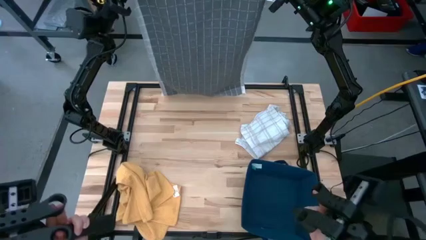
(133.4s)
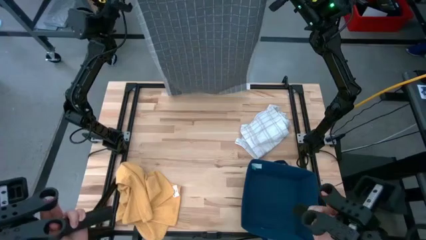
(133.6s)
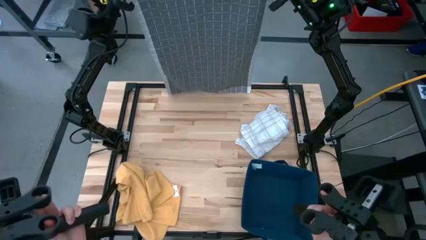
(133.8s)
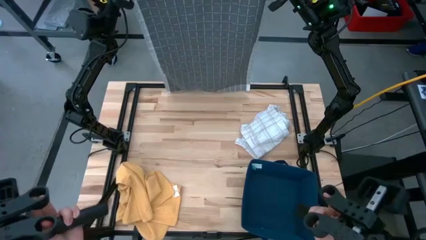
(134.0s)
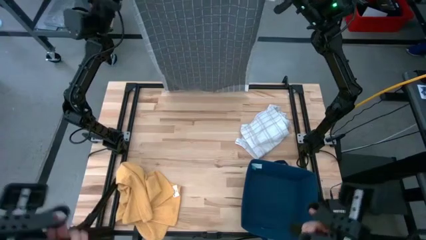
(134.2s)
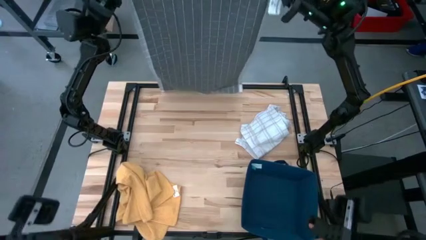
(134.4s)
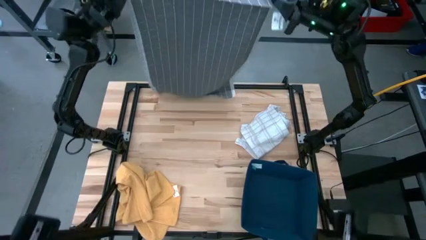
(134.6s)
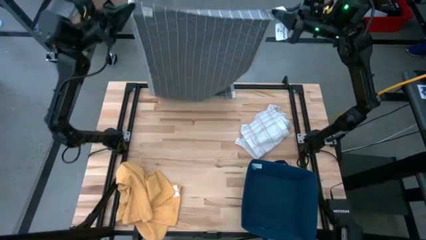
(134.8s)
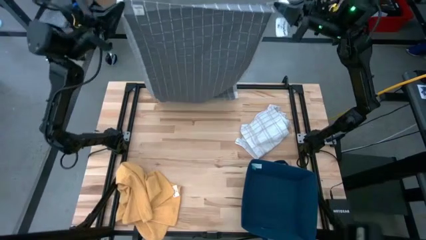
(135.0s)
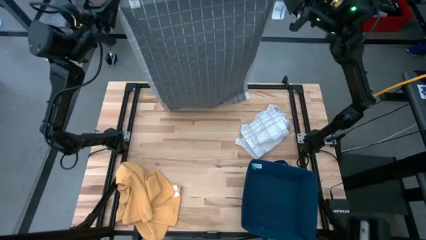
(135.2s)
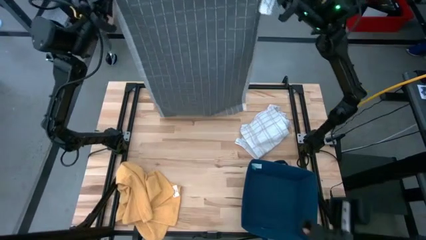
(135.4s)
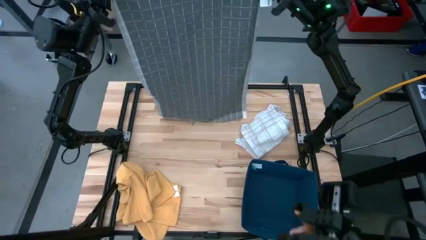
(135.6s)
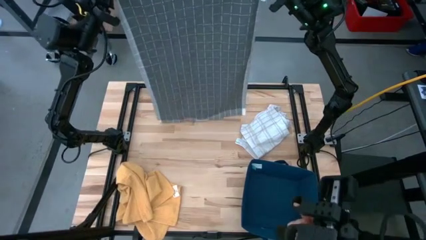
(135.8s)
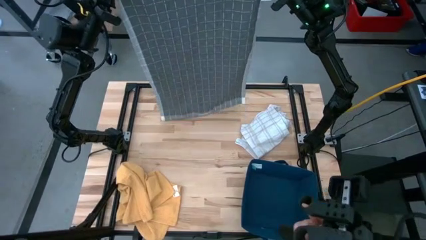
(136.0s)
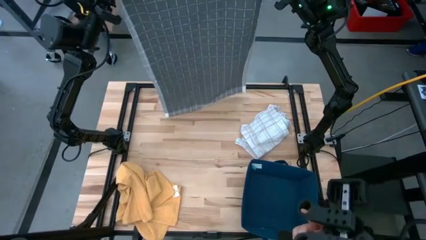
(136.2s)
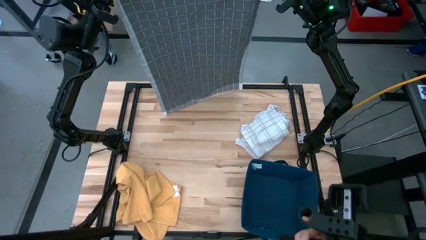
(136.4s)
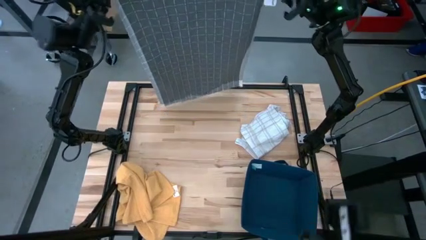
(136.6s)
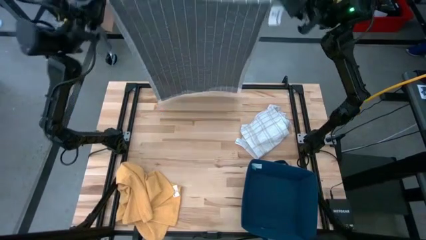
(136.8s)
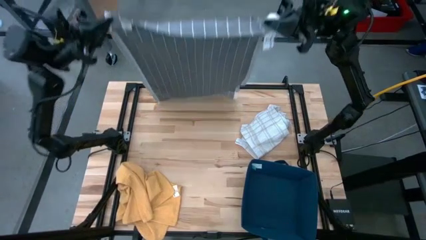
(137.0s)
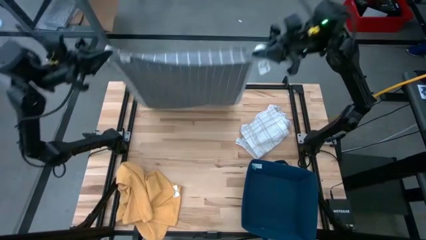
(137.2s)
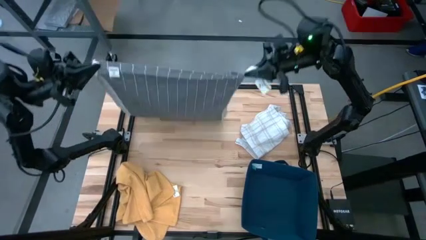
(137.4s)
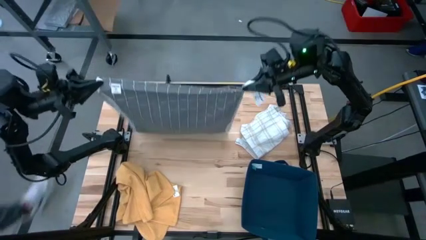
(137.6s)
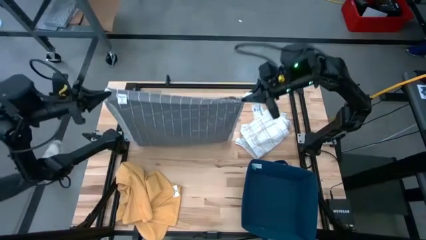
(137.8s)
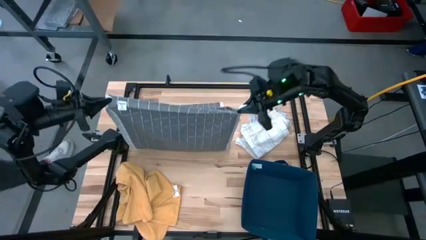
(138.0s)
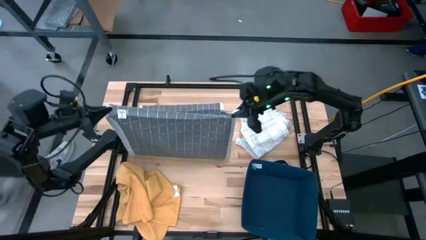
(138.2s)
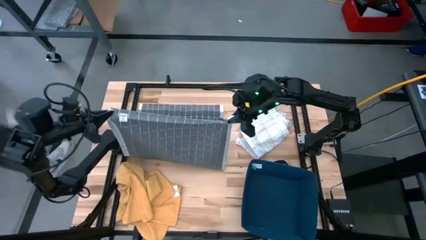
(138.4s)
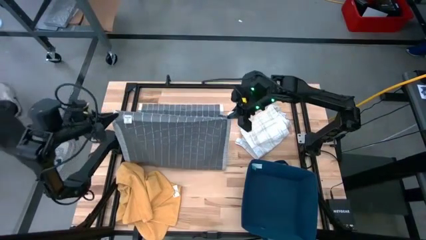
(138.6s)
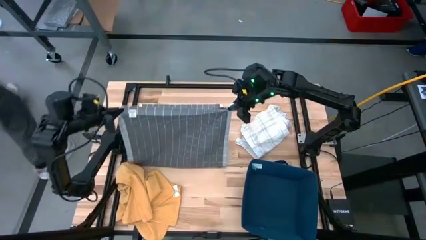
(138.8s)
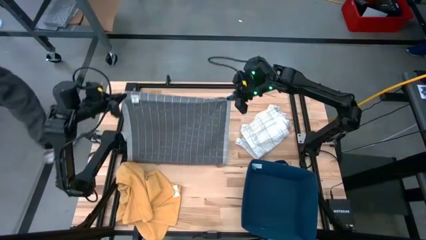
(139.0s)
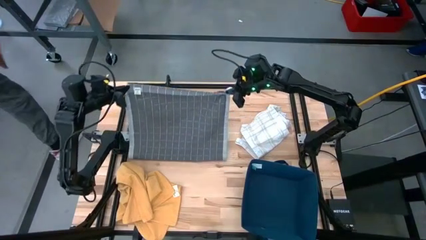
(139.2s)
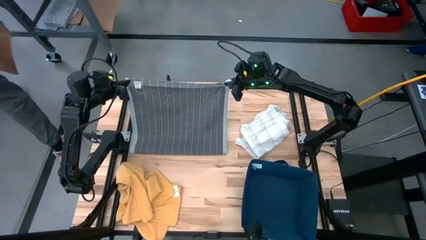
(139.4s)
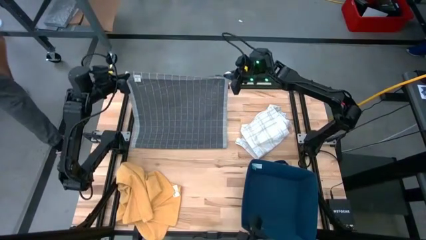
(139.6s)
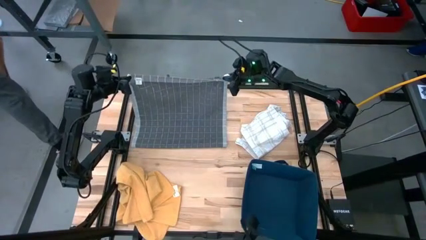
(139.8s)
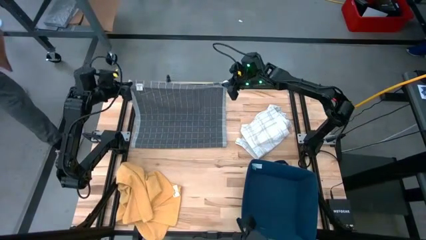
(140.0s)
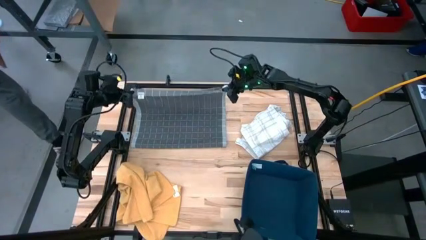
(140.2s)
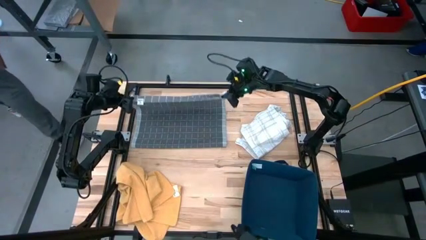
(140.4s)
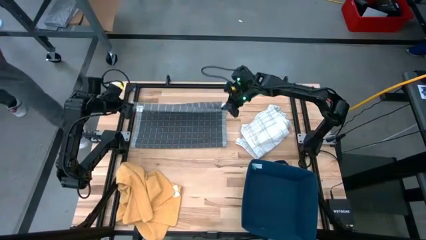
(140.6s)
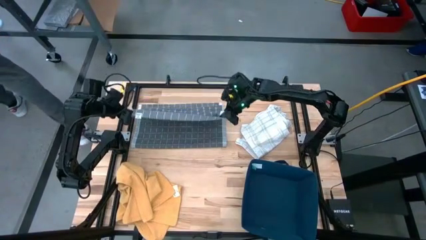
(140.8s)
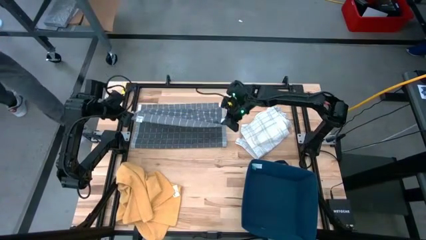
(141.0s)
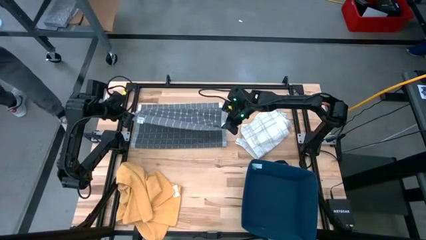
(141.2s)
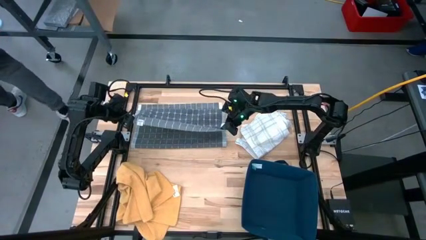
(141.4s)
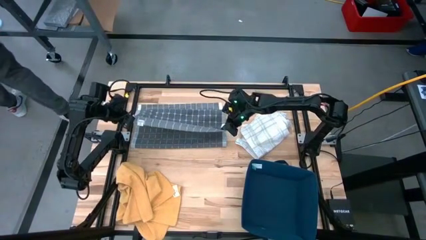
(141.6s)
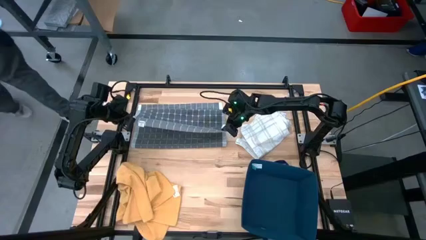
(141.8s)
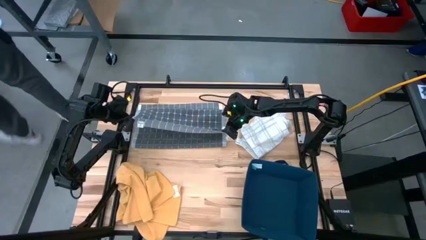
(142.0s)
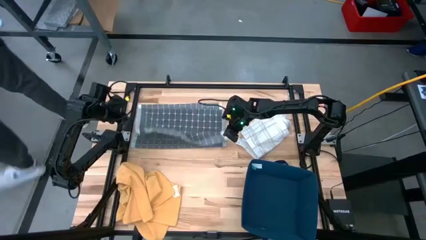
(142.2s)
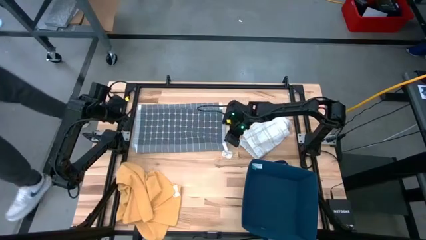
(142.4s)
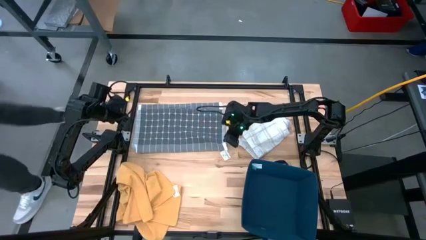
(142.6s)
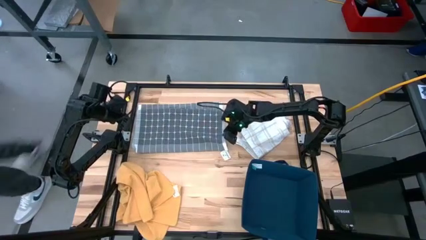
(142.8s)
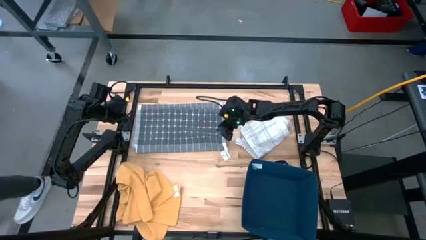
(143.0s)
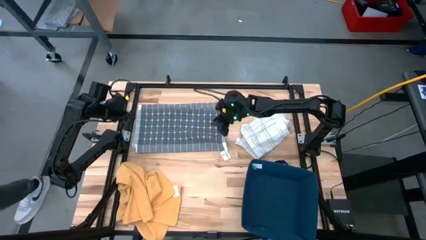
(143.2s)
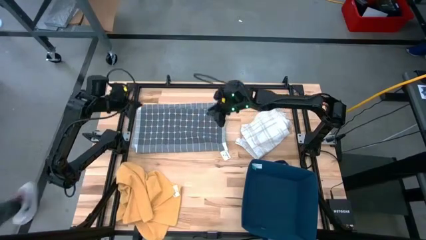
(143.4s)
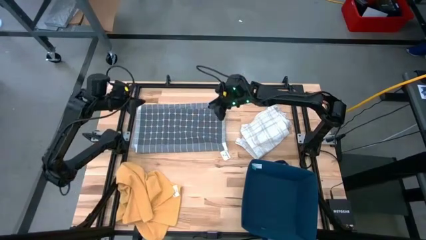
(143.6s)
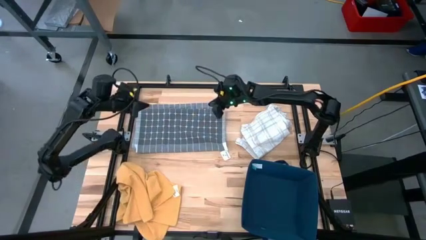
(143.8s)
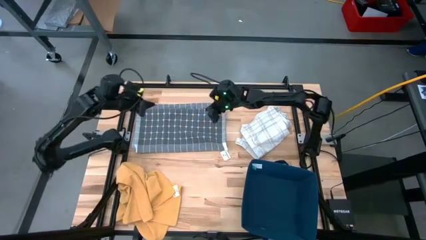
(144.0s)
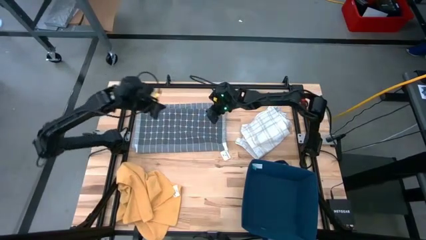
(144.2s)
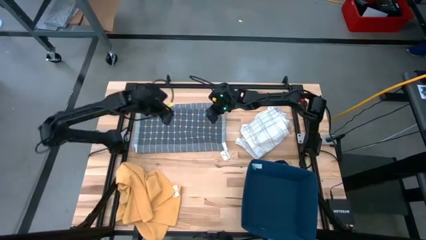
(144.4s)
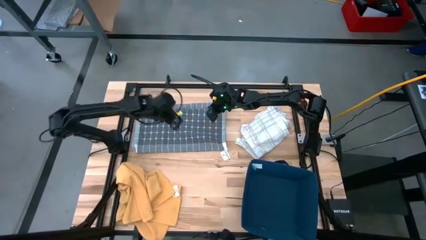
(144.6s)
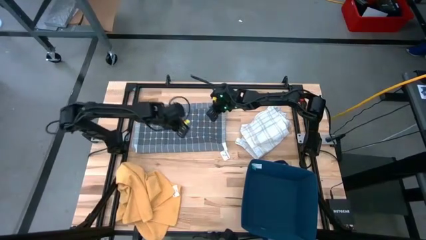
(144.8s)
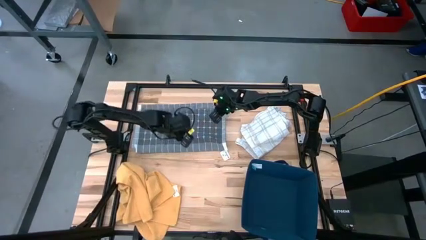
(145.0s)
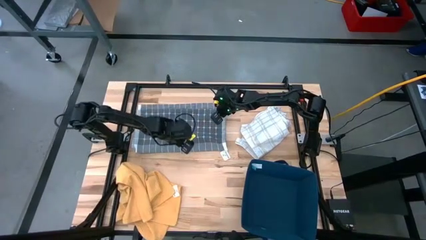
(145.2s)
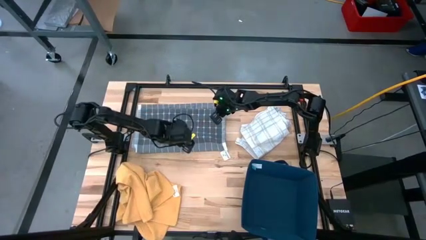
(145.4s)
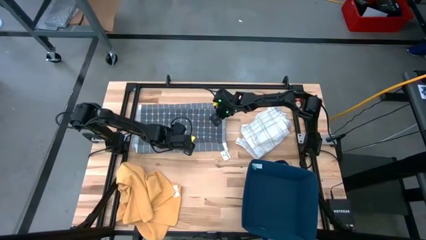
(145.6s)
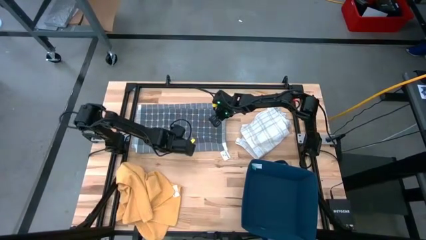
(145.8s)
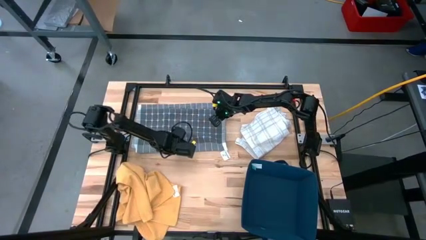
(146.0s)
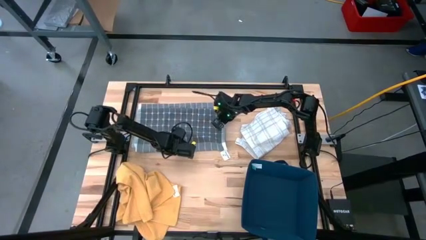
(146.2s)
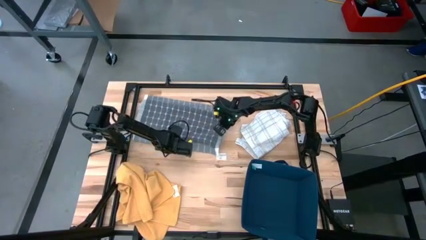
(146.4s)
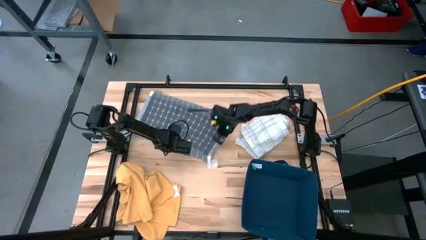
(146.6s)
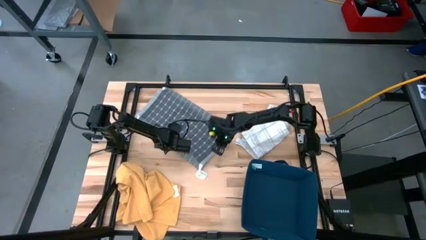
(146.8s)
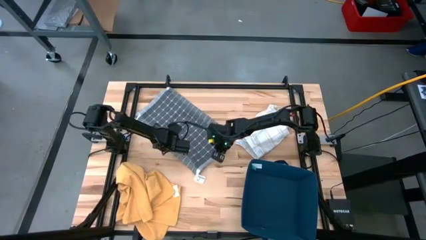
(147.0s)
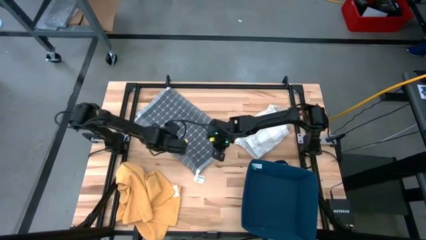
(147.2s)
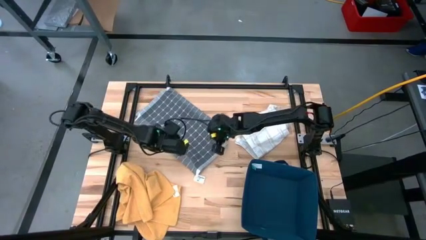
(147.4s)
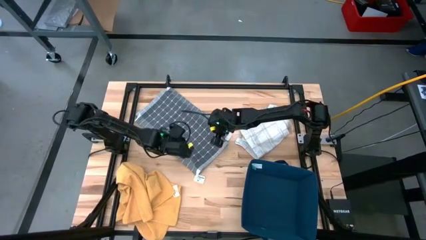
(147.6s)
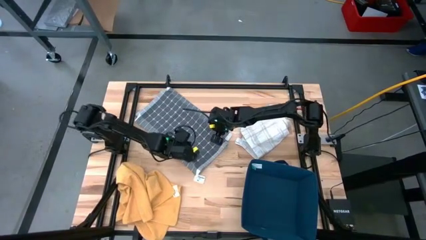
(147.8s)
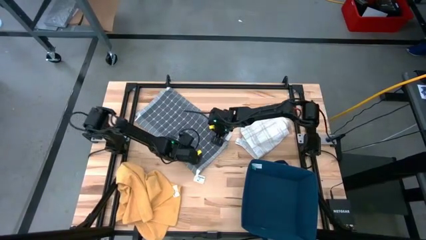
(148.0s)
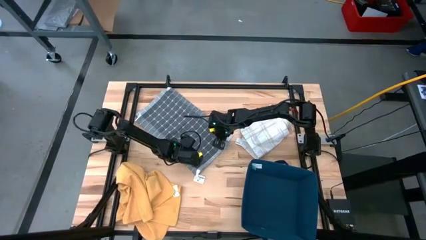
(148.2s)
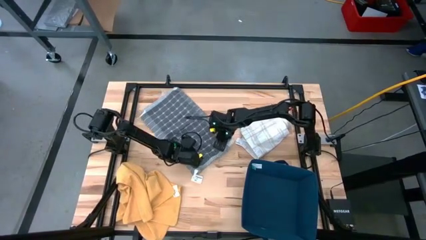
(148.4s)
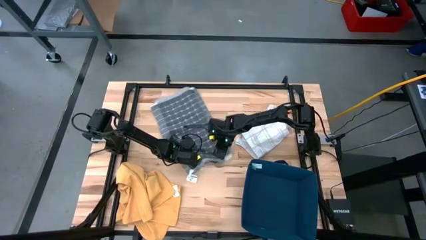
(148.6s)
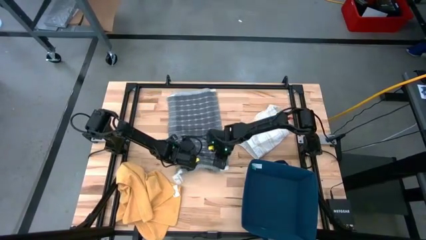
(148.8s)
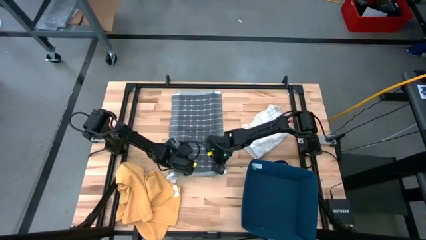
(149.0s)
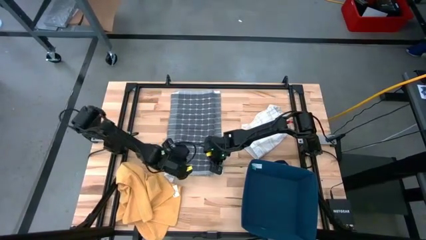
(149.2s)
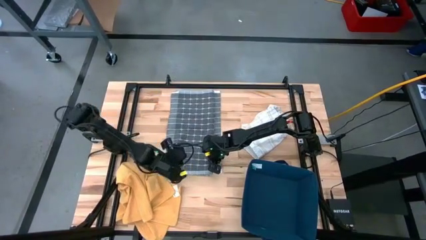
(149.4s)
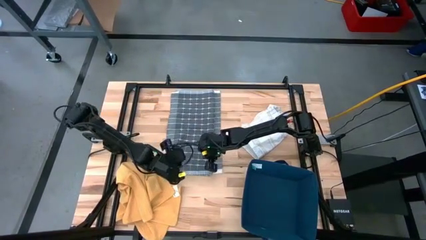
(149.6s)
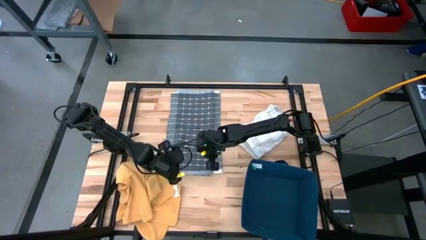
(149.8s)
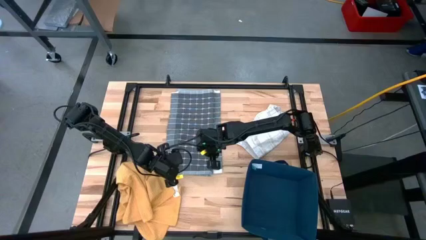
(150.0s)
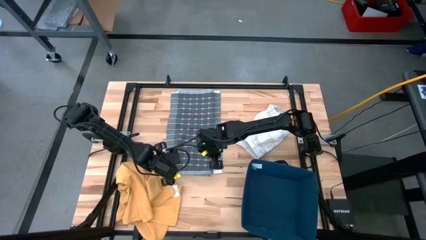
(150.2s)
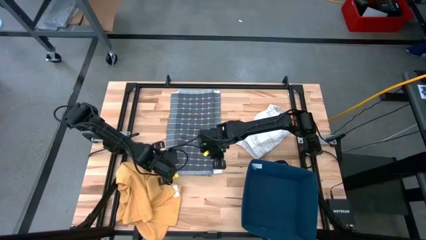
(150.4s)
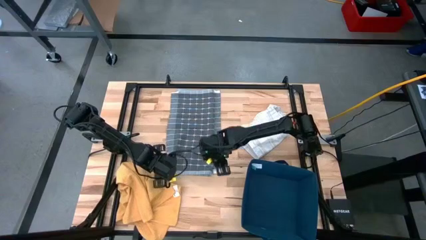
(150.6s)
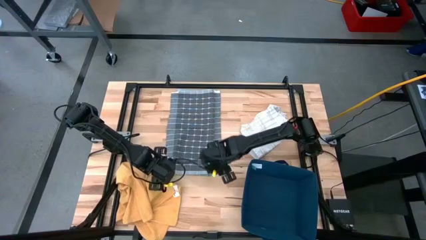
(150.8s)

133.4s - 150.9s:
Task: Fold towel
Fold the gray kitchen towel
